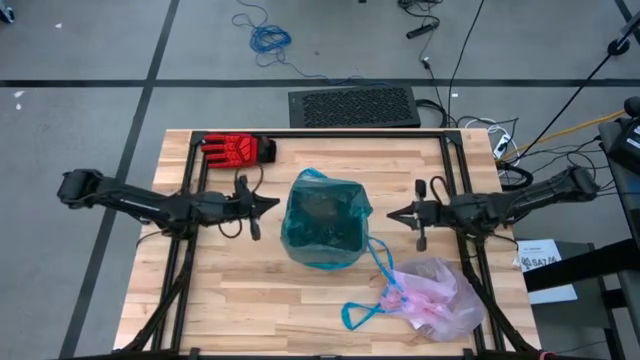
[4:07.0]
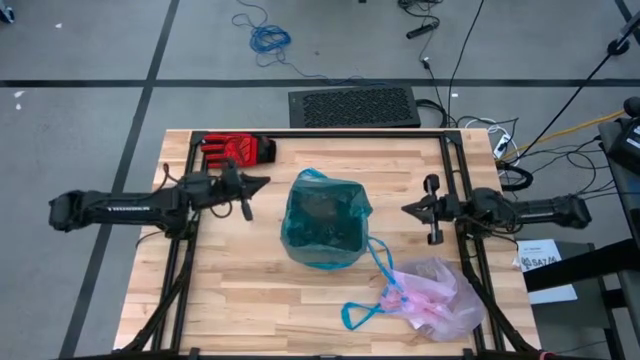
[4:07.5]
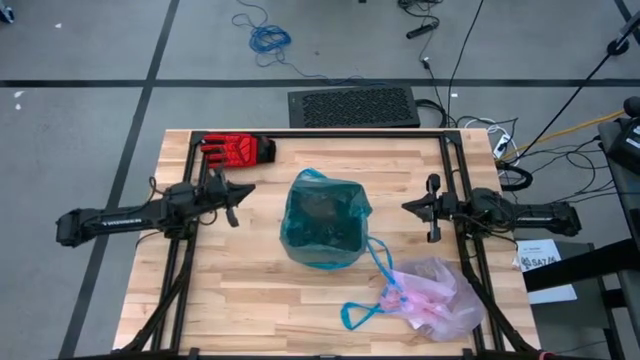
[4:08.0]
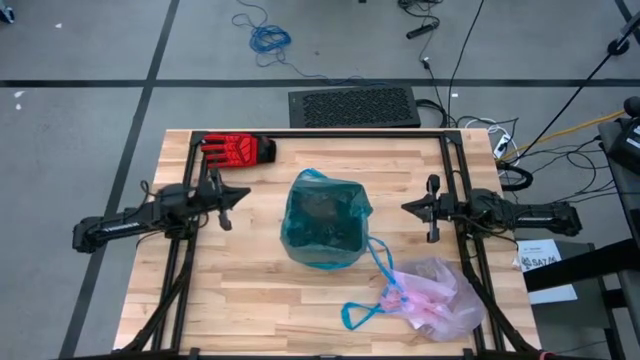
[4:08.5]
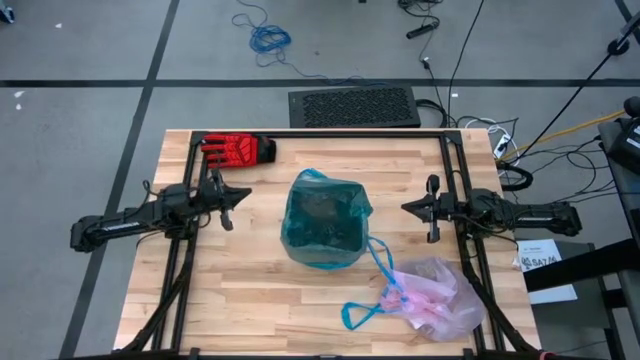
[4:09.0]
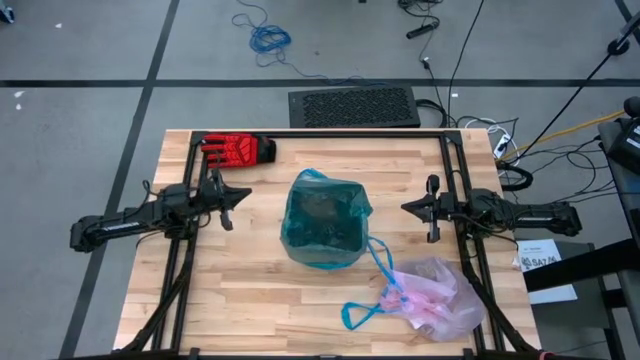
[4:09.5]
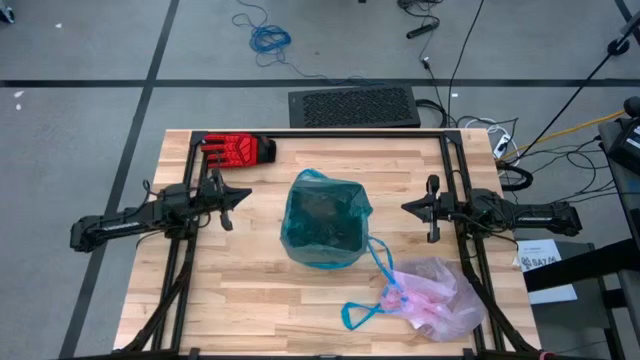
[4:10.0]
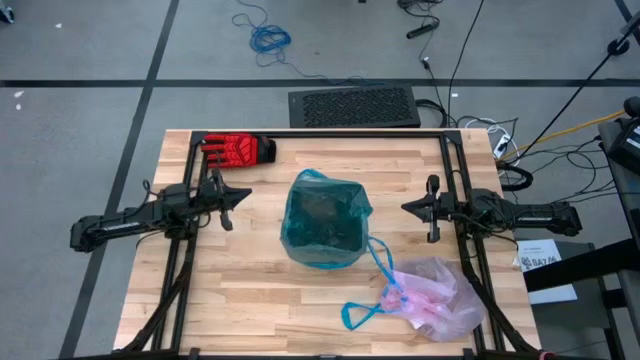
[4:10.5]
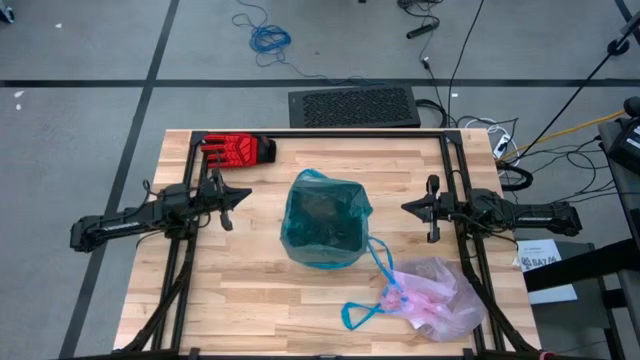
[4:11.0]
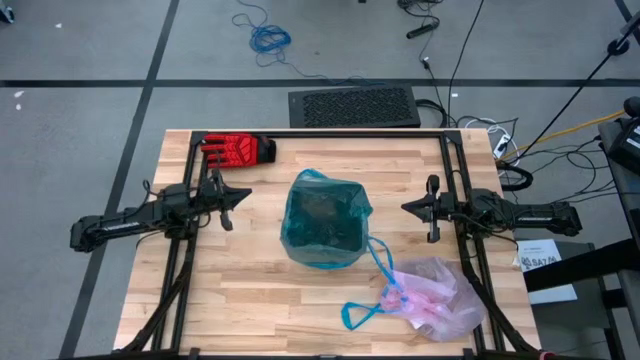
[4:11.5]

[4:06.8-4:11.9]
Task: place trash/remove bag and relplace
Return to Home Position

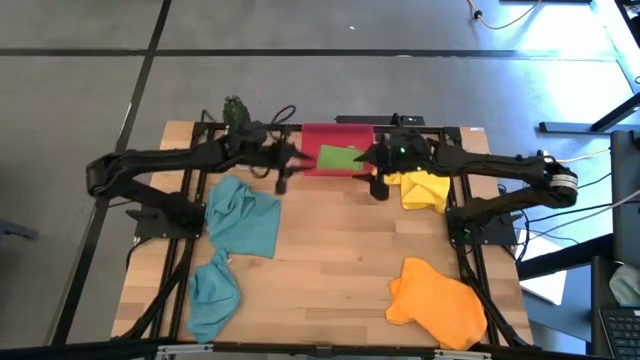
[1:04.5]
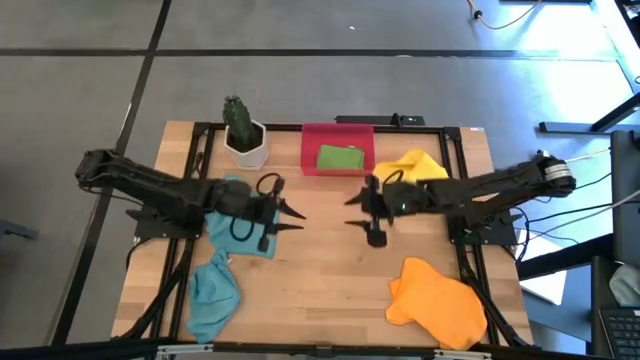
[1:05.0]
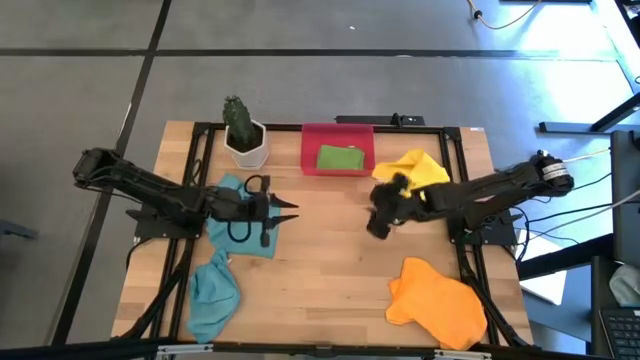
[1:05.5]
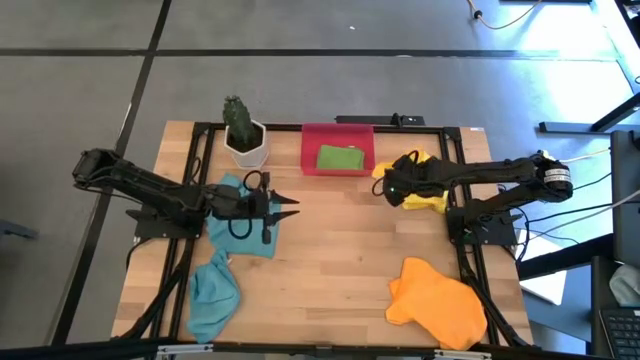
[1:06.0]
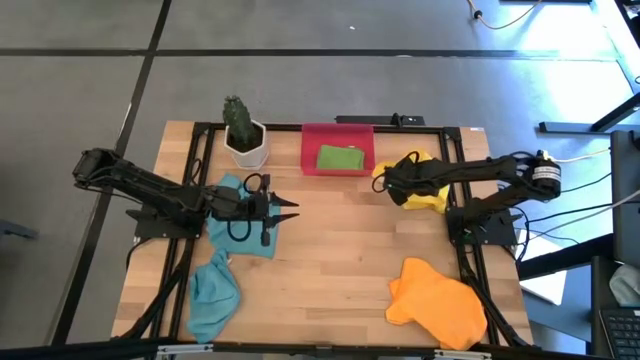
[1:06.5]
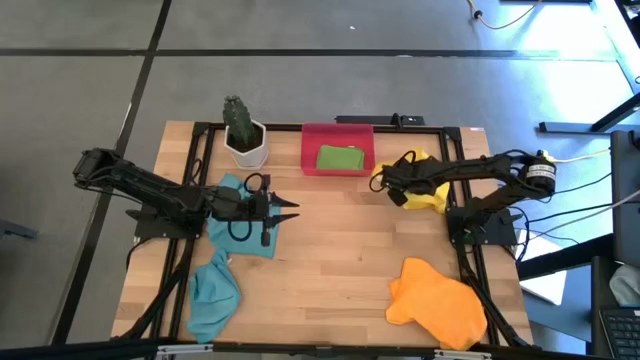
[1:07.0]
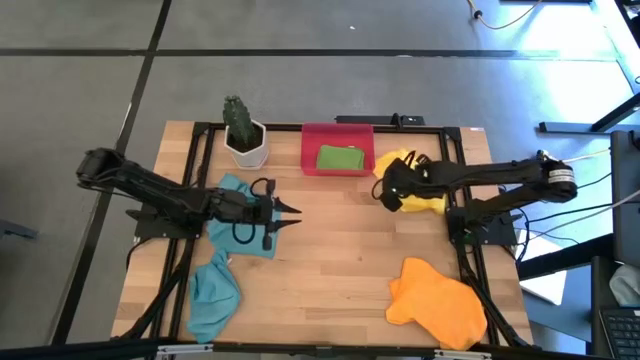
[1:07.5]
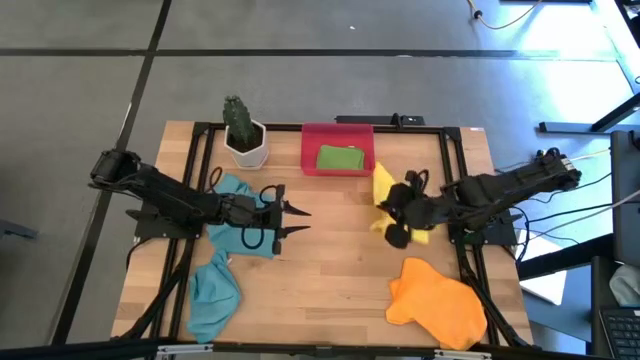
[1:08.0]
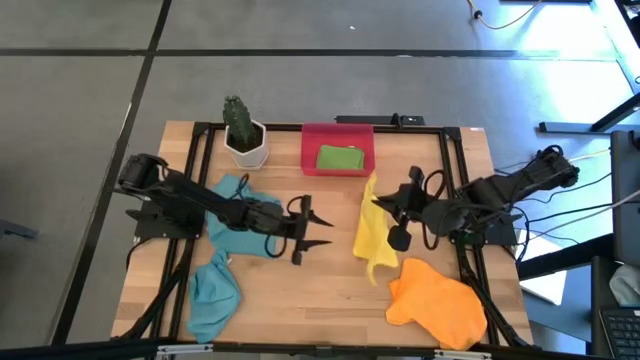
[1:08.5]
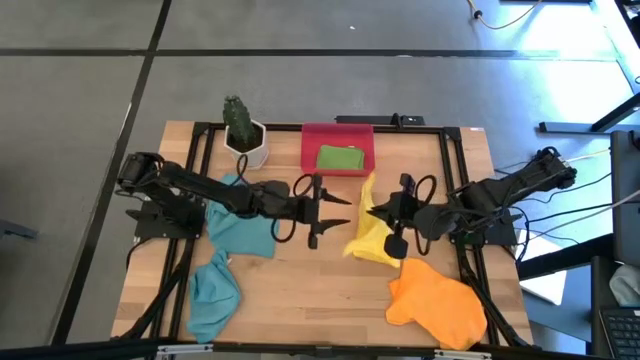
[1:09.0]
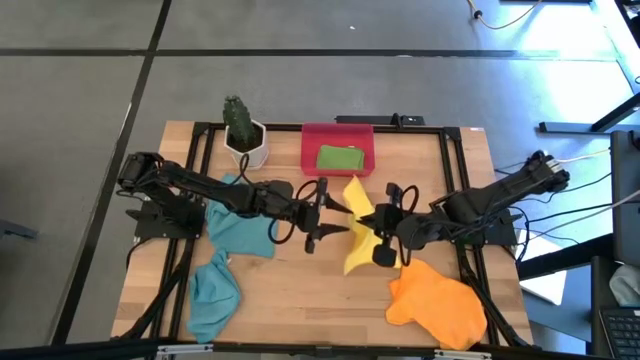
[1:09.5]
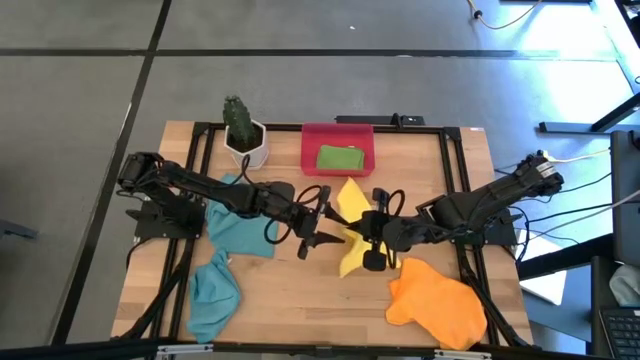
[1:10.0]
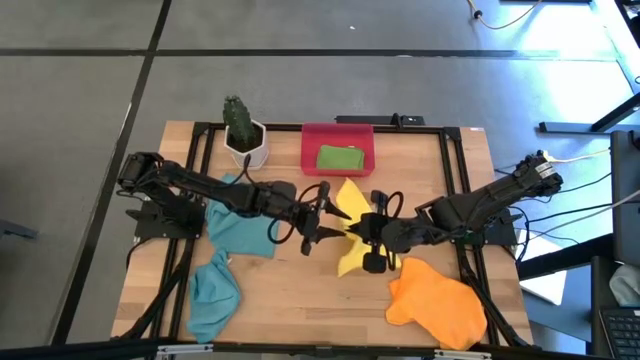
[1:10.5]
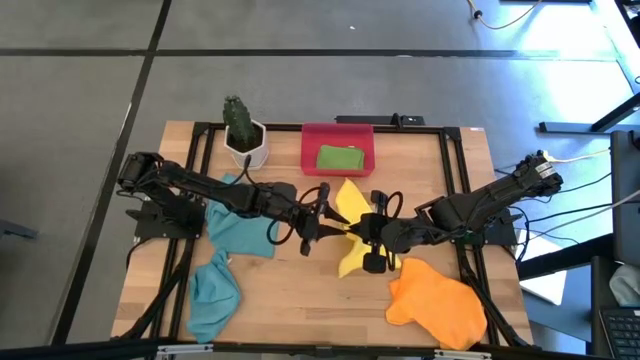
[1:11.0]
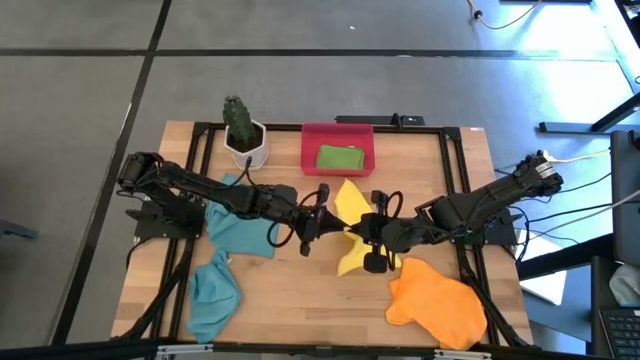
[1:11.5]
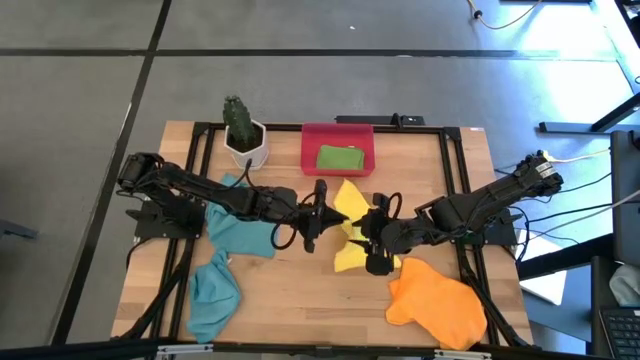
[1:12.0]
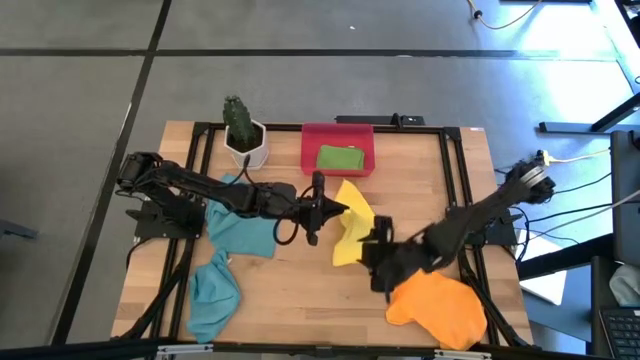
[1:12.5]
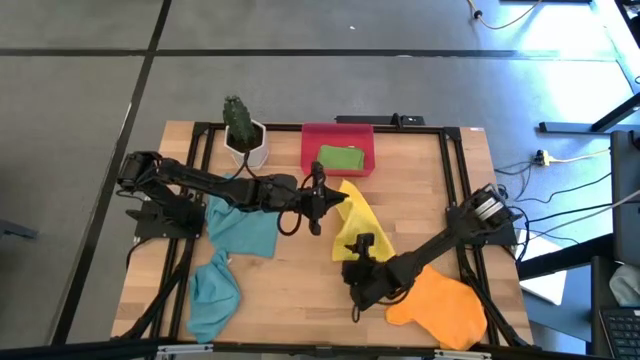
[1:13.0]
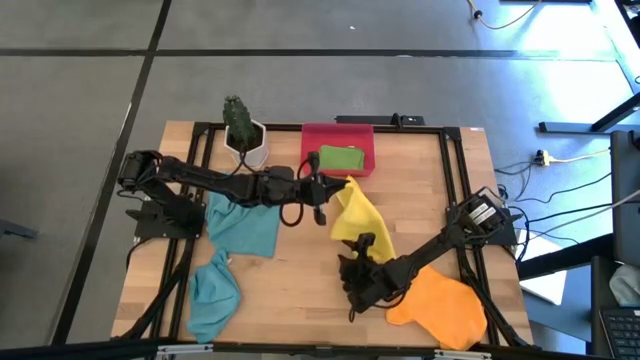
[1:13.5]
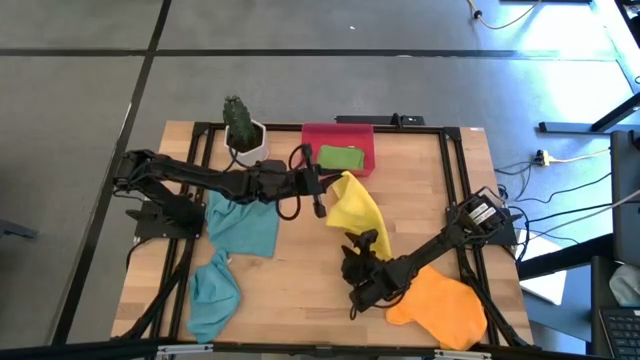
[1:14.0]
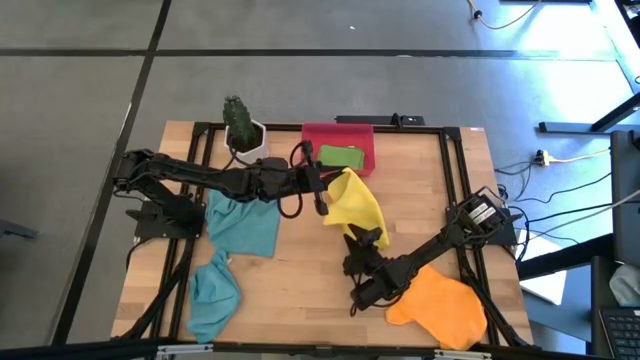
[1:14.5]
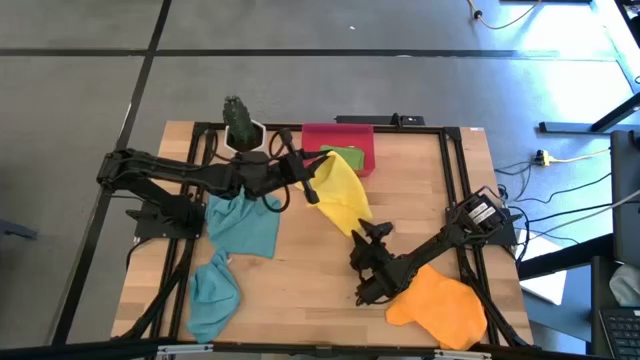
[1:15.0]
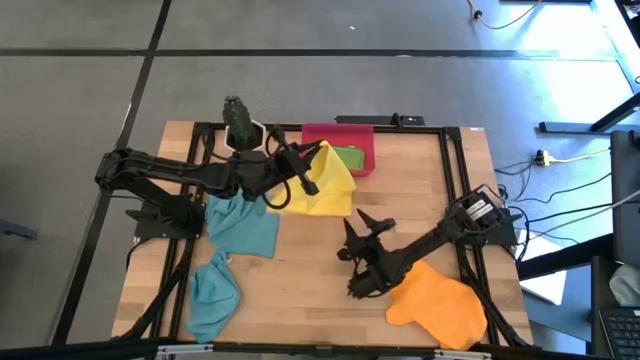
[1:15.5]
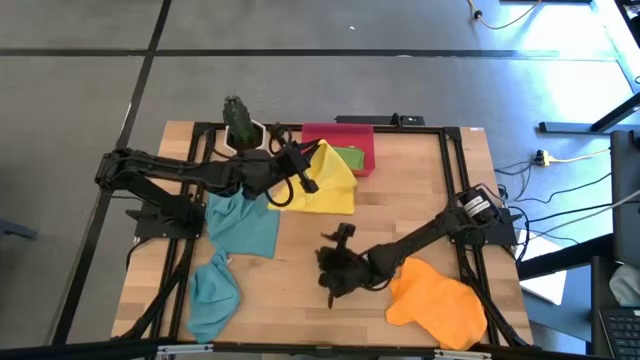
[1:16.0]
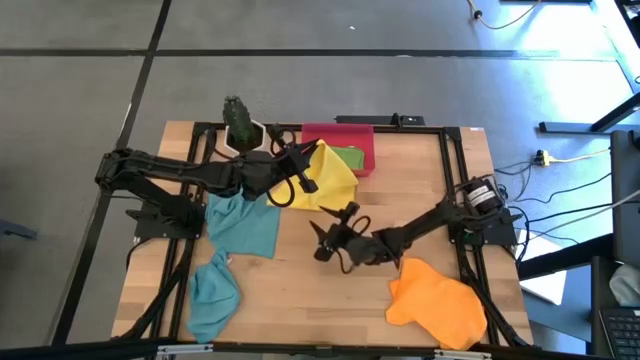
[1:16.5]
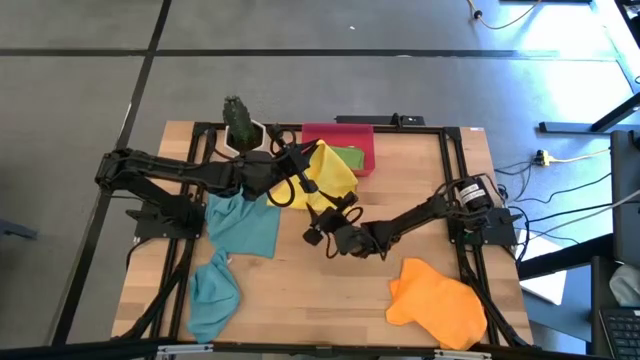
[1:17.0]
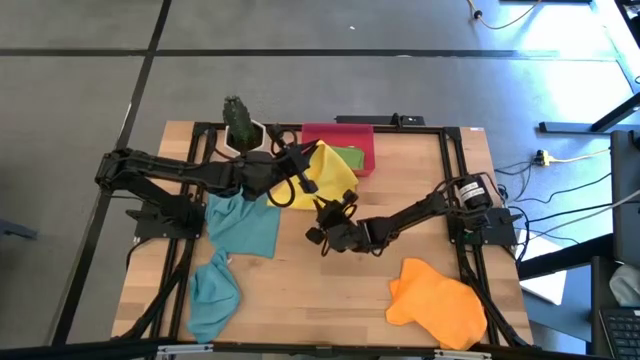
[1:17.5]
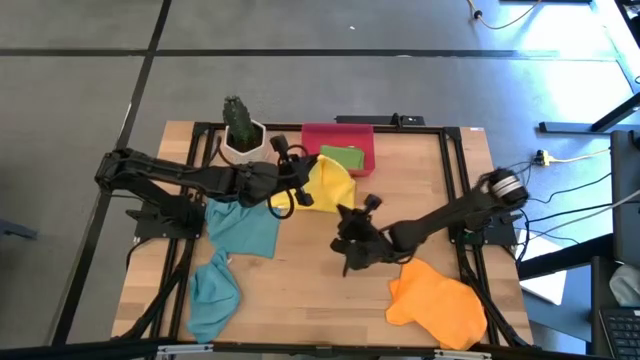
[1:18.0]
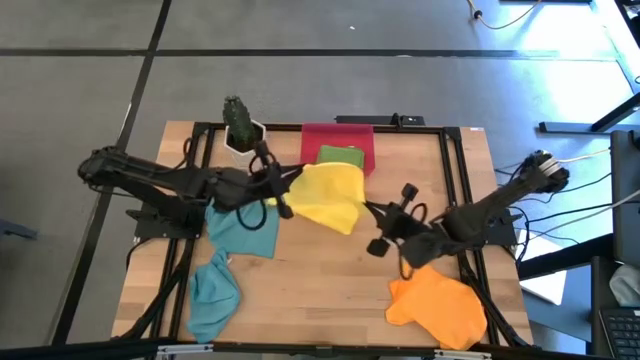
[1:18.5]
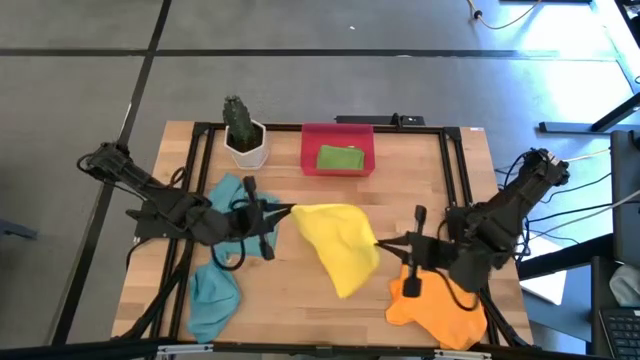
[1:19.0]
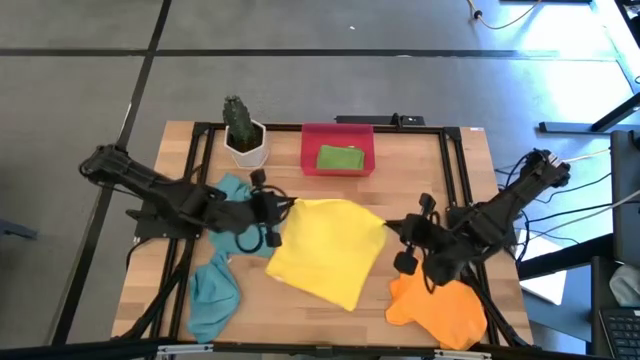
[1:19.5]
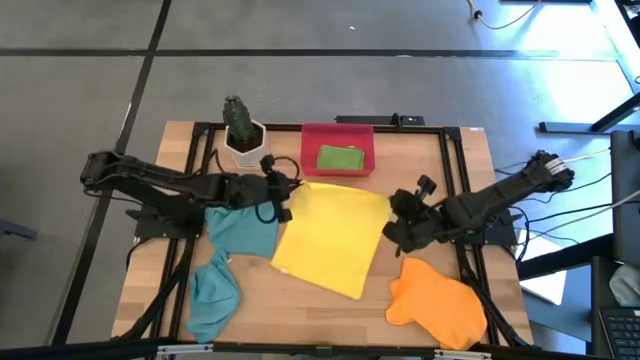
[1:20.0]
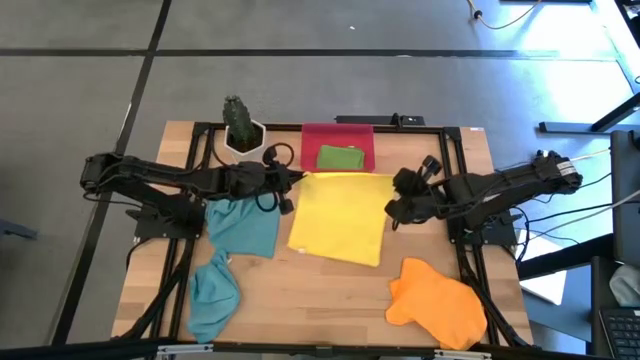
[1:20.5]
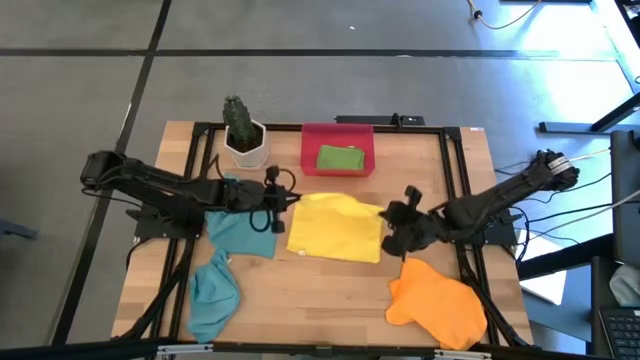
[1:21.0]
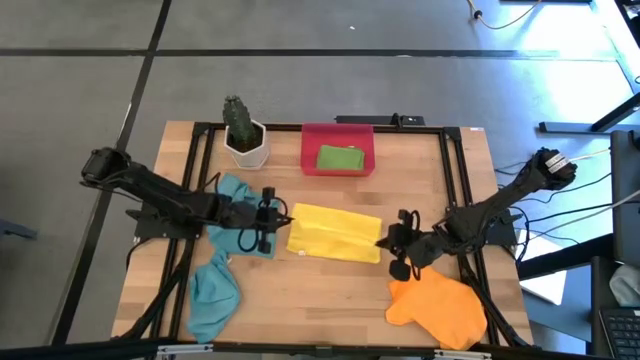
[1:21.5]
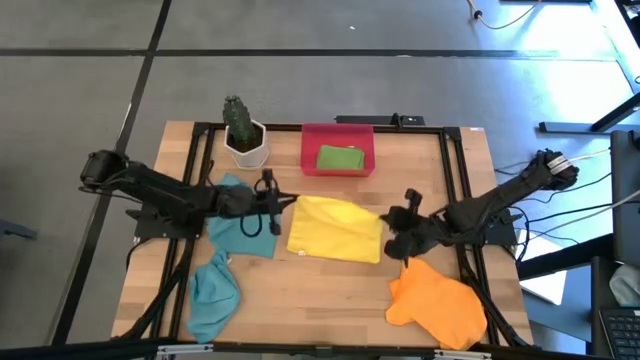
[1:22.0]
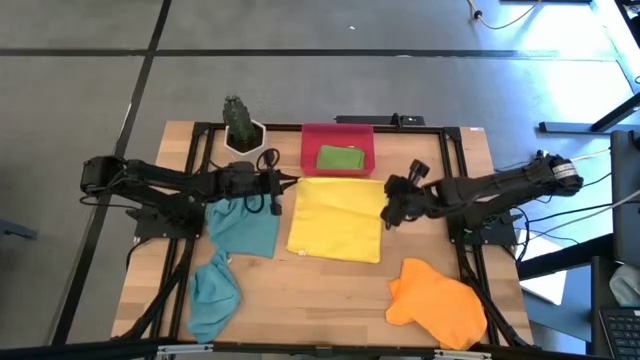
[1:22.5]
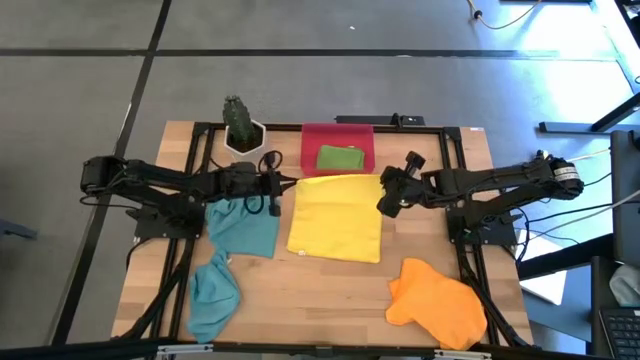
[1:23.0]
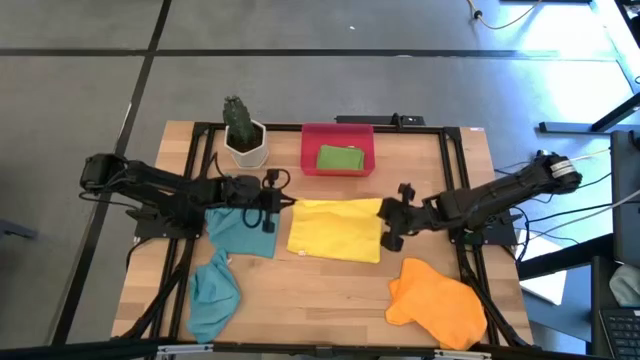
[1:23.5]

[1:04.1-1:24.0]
Task: Fold microfiber towels
Fold the yellow microfiber towel
